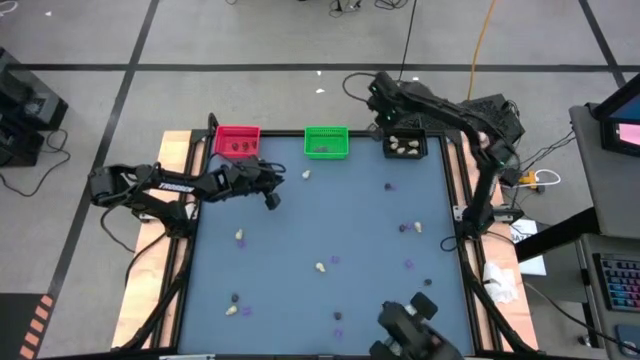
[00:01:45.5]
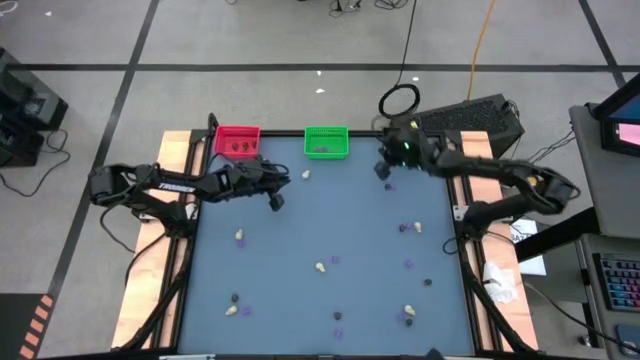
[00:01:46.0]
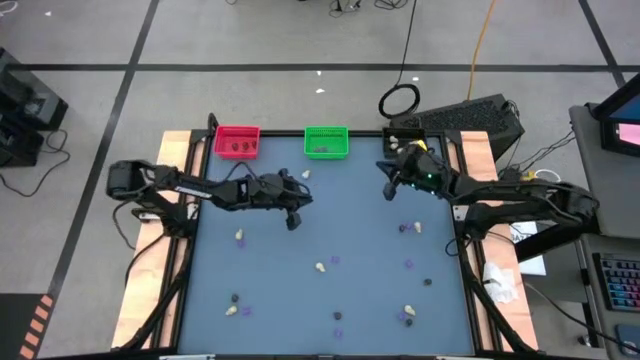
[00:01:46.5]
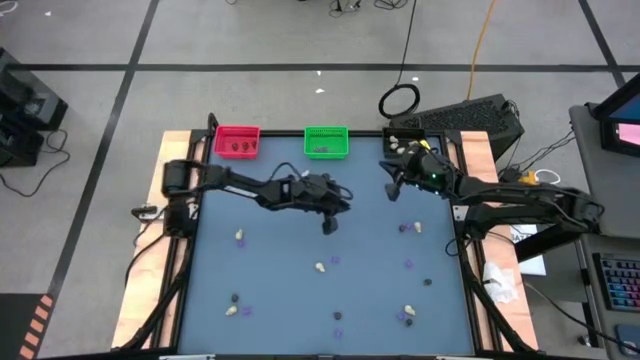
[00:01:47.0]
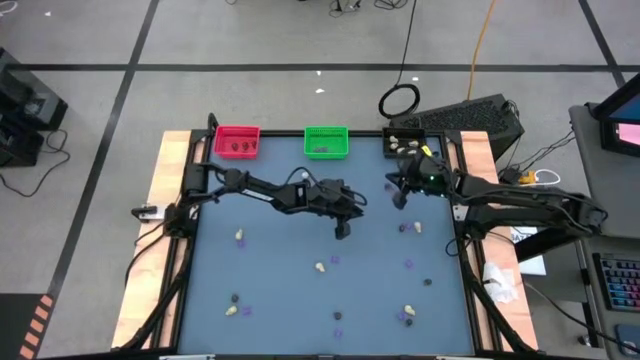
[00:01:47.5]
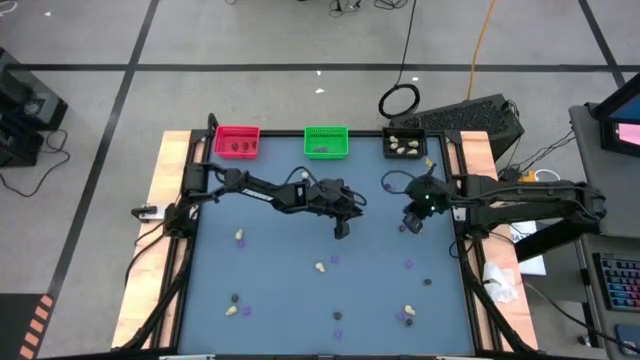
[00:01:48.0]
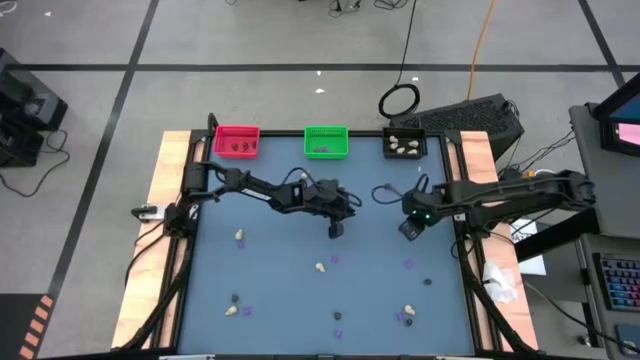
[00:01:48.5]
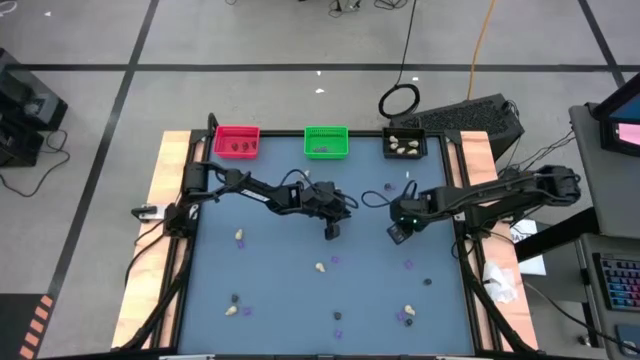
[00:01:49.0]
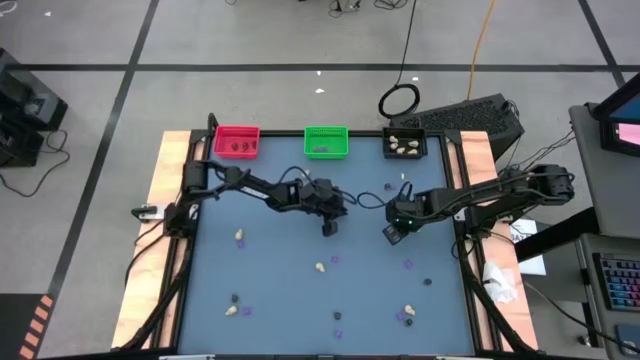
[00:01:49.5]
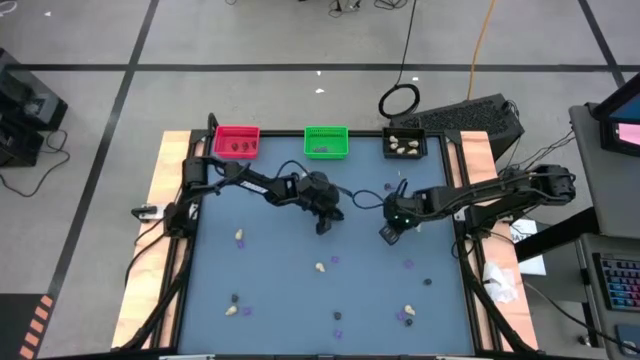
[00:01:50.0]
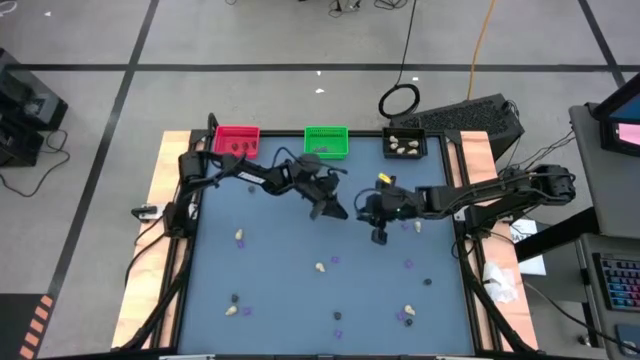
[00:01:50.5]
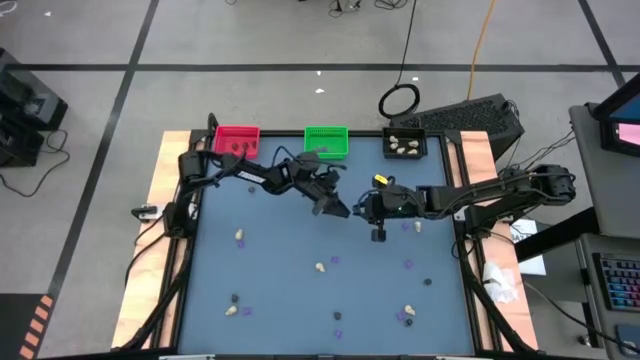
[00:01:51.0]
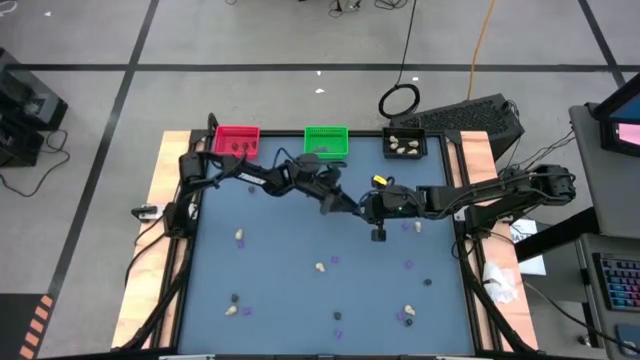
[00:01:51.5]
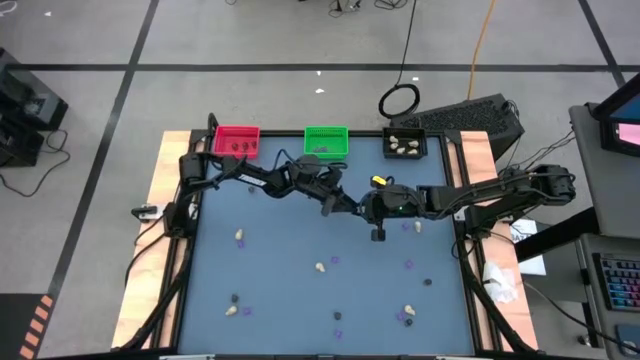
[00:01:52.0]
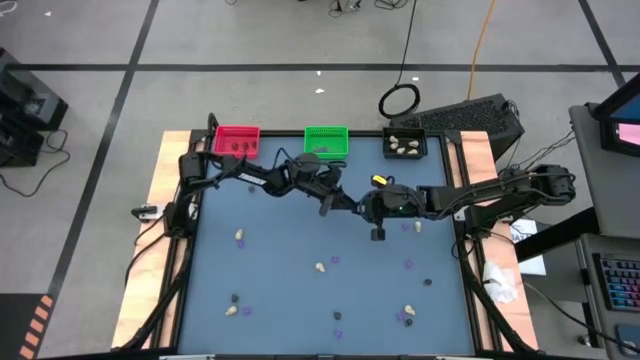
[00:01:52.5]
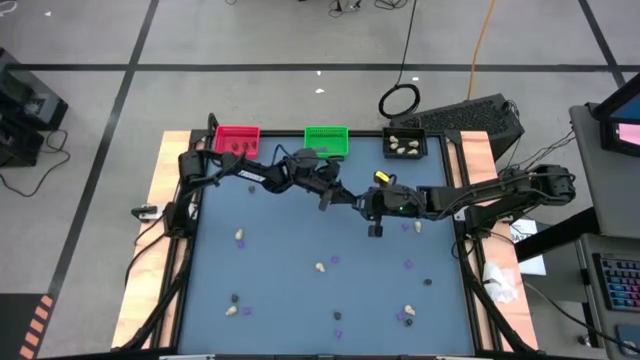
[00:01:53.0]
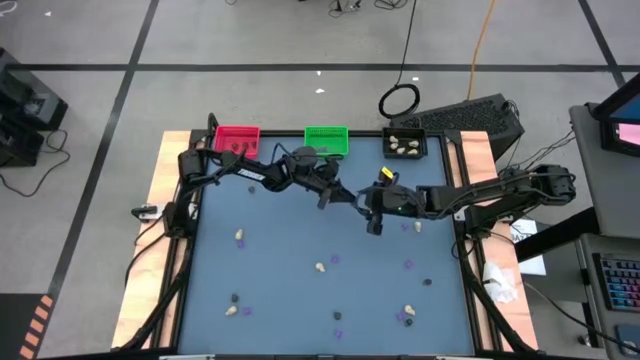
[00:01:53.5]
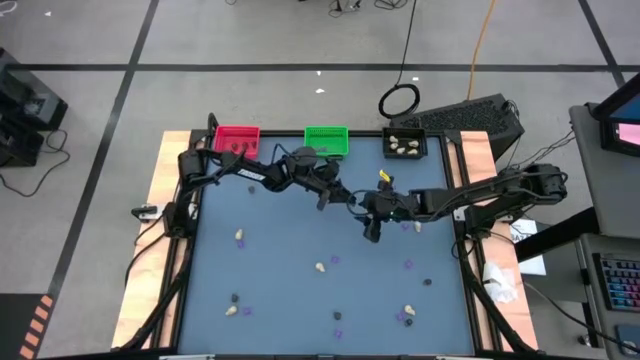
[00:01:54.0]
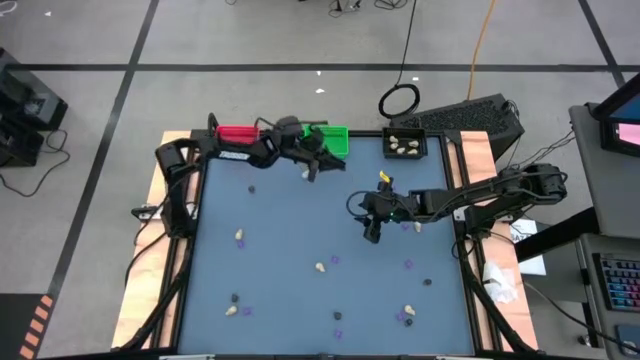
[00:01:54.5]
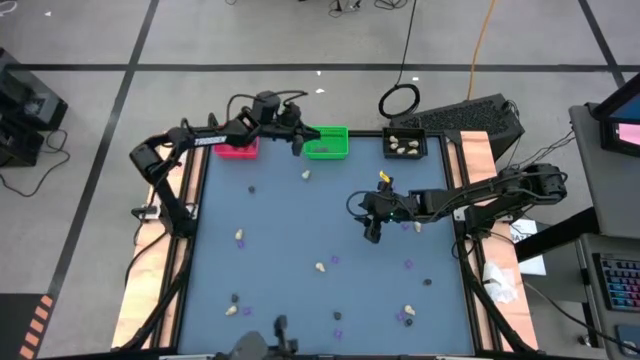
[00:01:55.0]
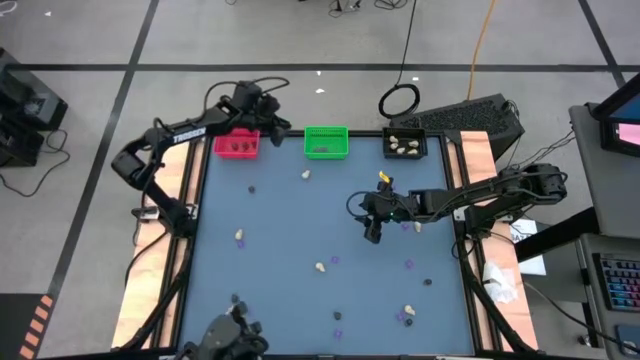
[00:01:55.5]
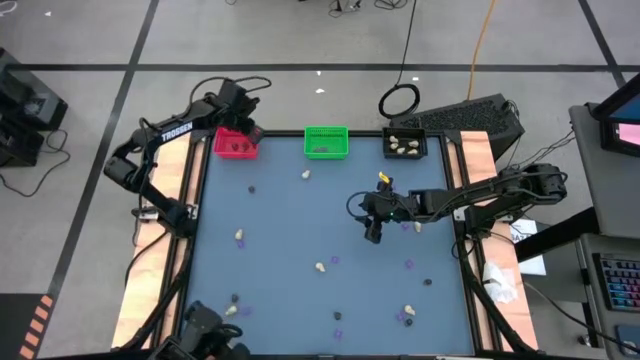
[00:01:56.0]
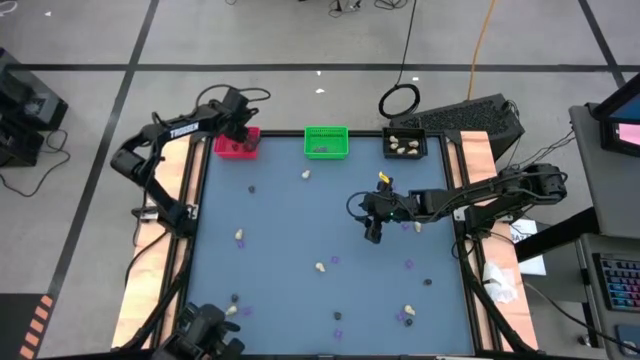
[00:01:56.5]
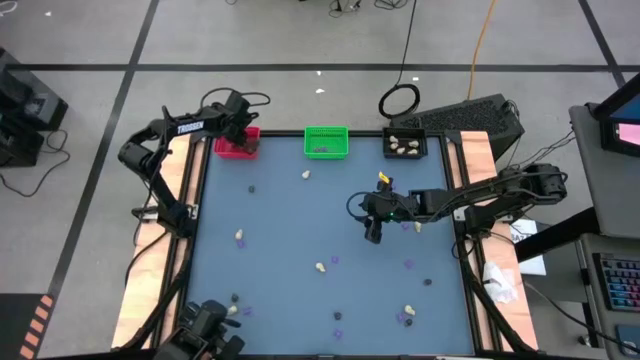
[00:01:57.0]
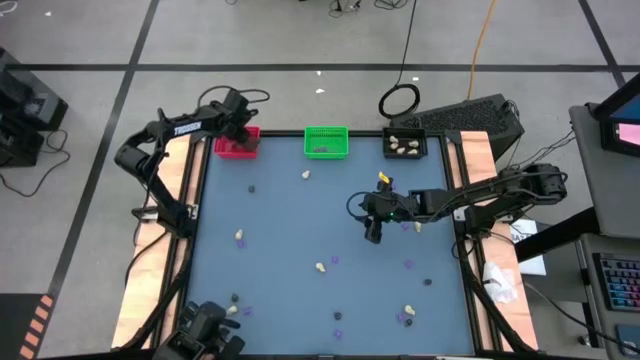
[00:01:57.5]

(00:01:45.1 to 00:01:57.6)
Task: Sort Halloween decoration
Put the black skull toy into the red bin

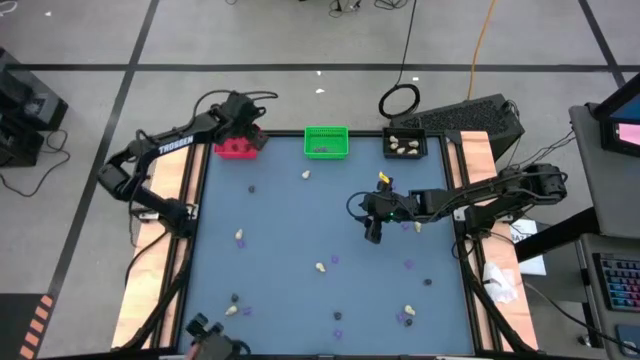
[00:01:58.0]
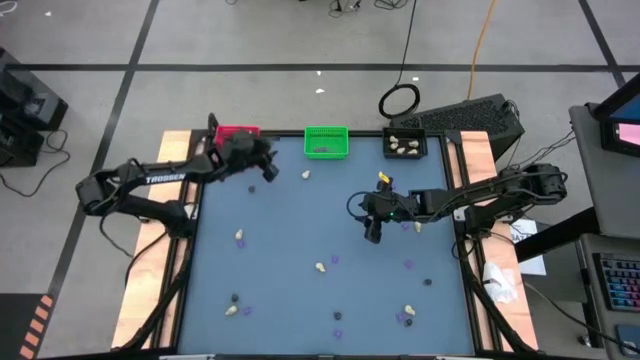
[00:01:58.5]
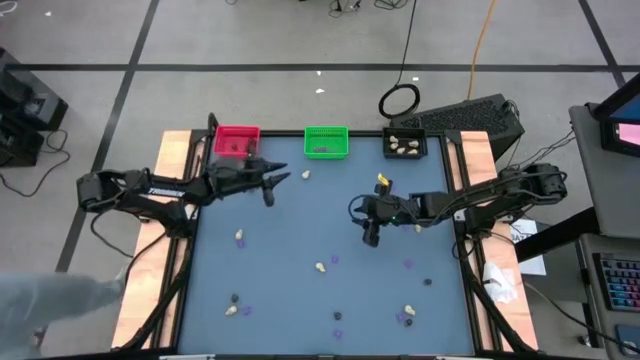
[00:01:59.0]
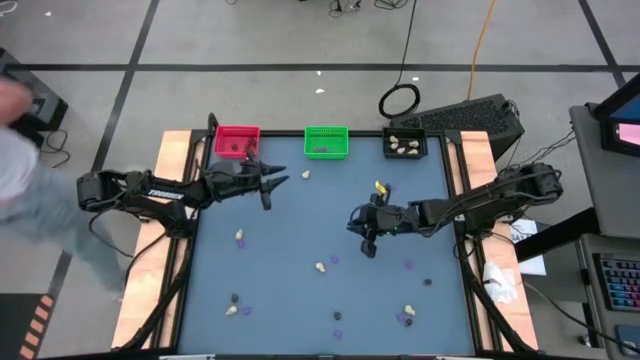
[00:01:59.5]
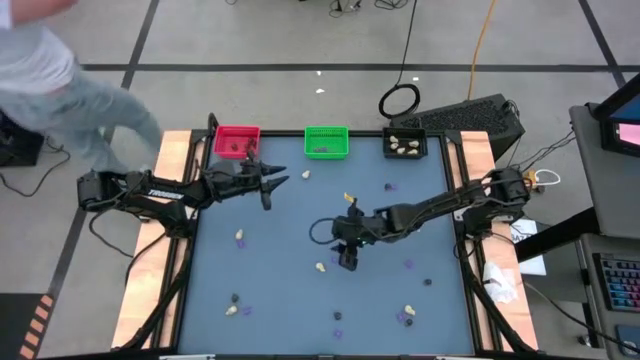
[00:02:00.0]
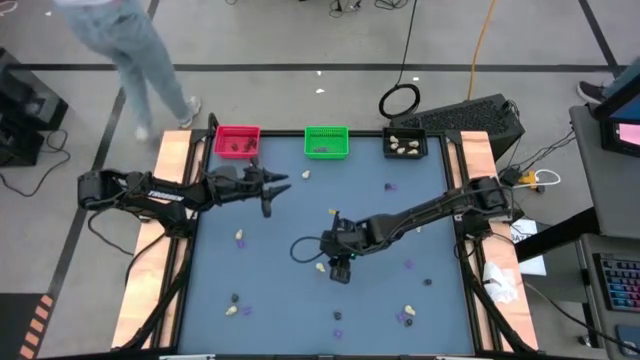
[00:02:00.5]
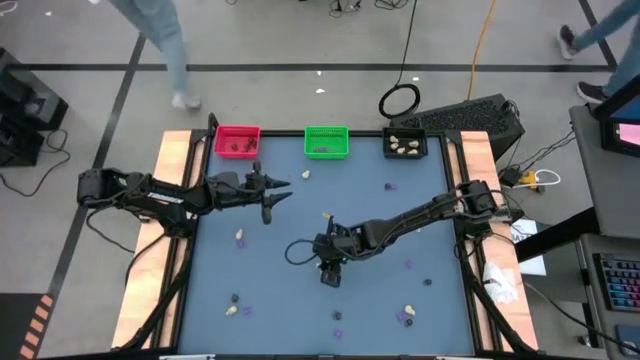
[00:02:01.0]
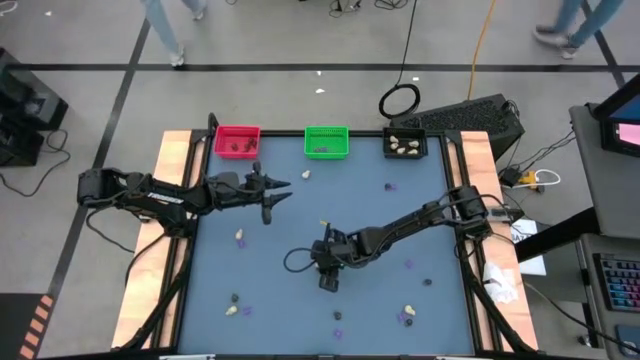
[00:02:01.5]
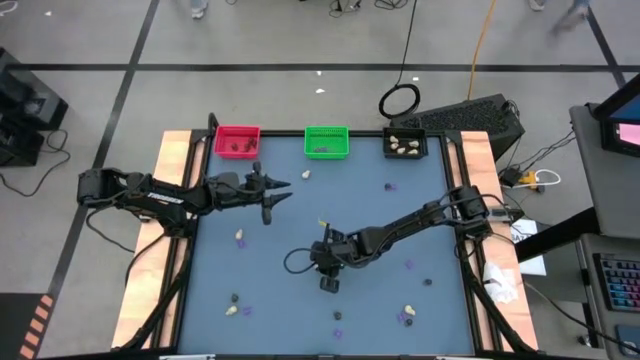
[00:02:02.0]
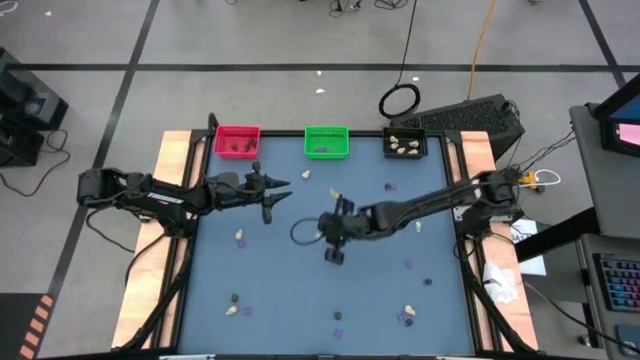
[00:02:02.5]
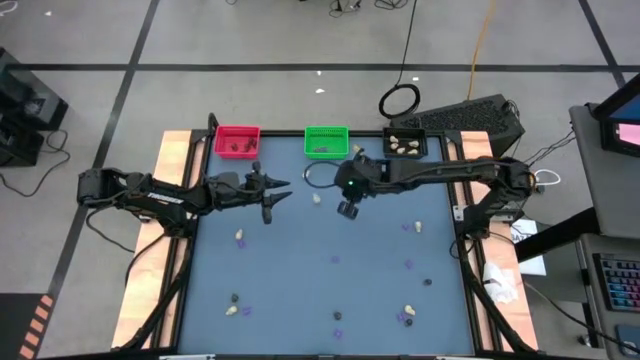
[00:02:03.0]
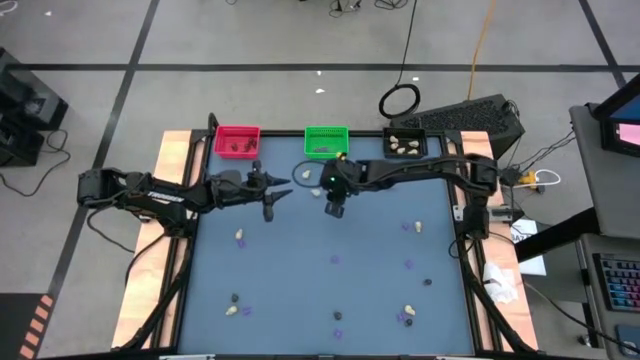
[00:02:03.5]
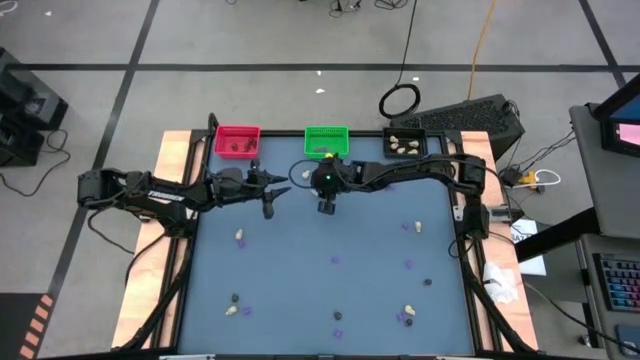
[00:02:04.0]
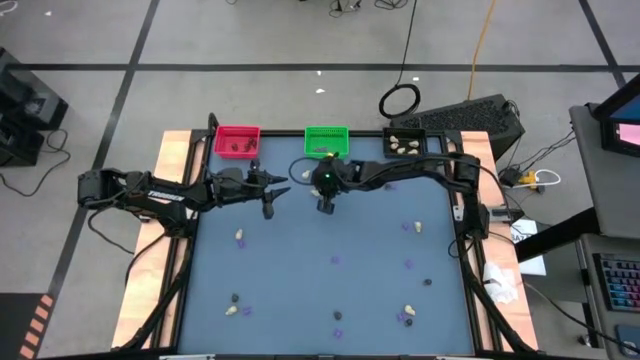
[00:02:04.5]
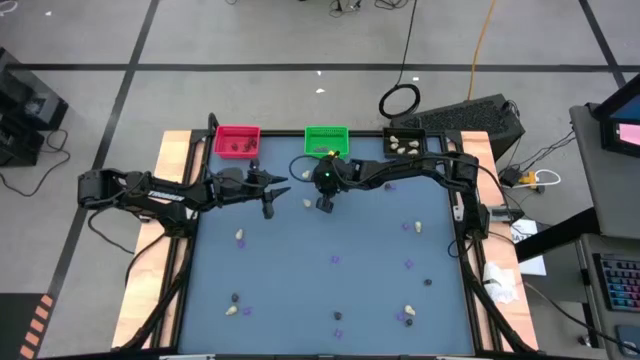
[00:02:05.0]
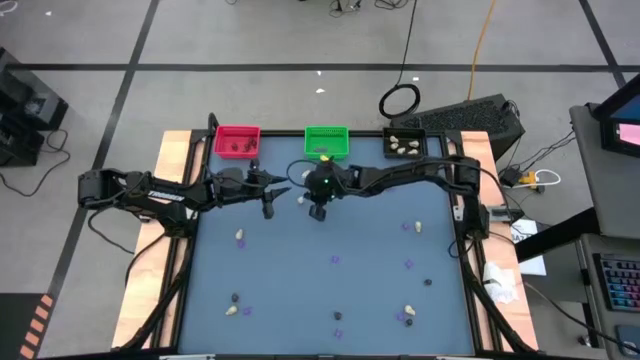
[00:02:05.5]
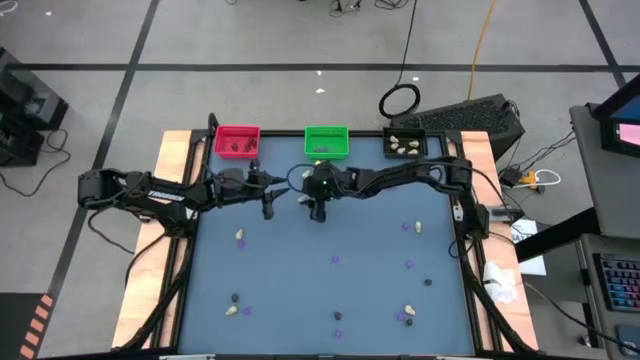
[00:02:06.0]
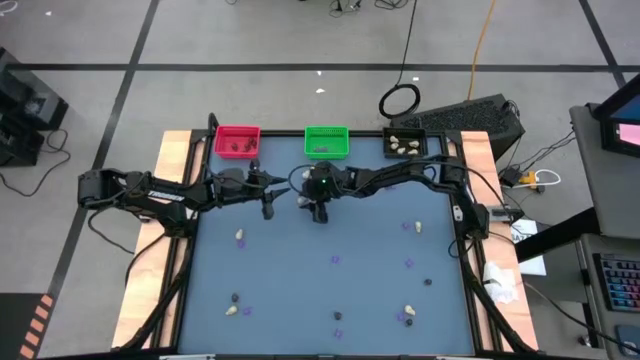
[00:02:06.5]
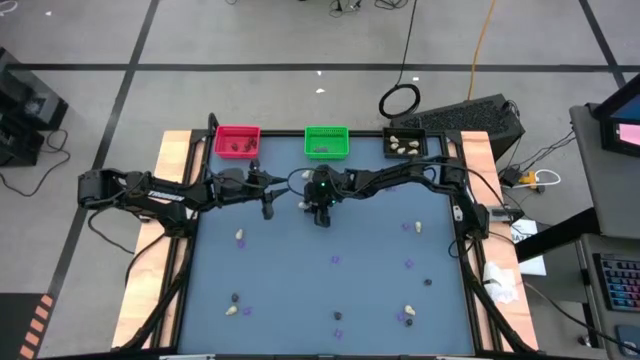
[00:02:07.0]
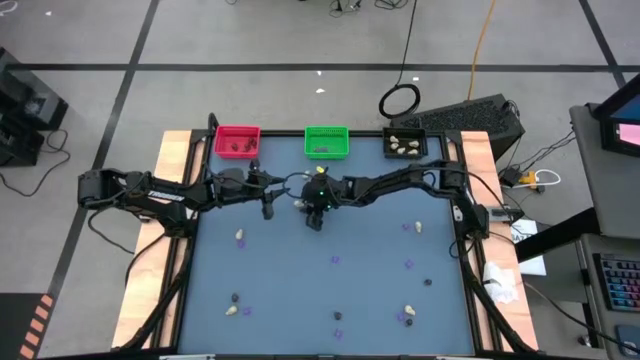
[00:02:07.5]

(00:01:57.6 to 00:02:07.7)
Put the white skull toy into the black bin
